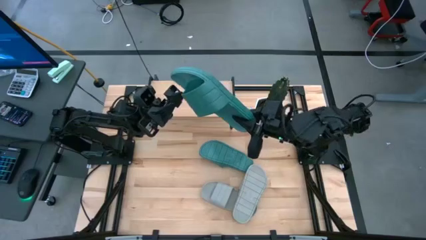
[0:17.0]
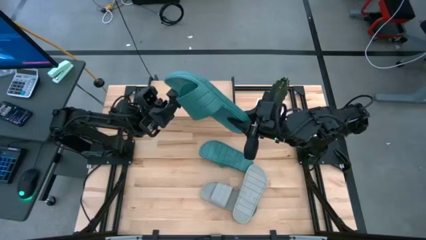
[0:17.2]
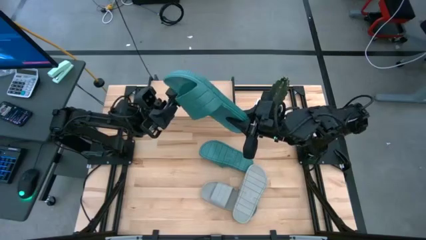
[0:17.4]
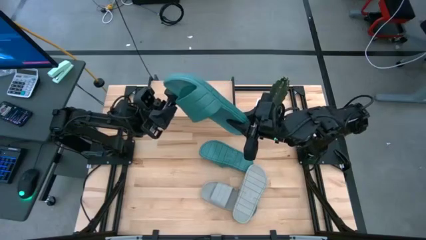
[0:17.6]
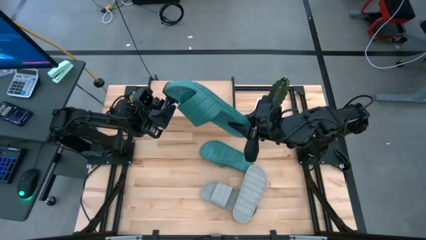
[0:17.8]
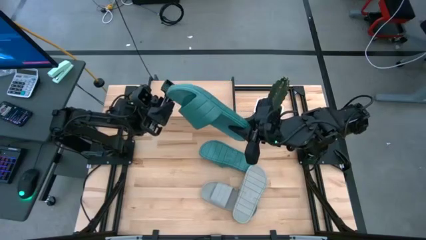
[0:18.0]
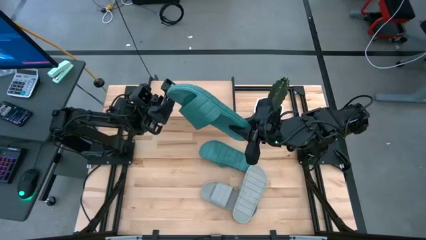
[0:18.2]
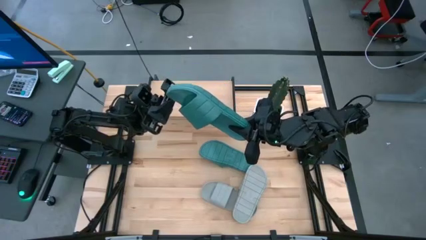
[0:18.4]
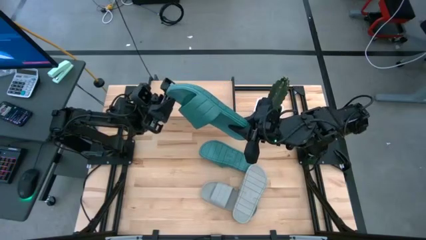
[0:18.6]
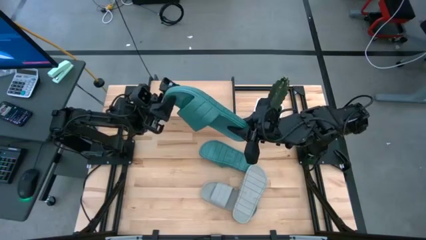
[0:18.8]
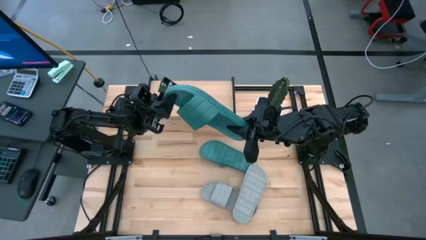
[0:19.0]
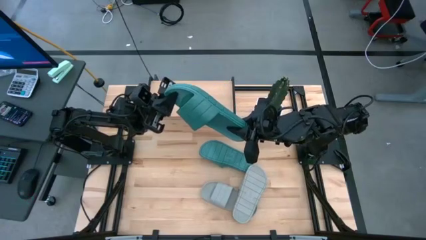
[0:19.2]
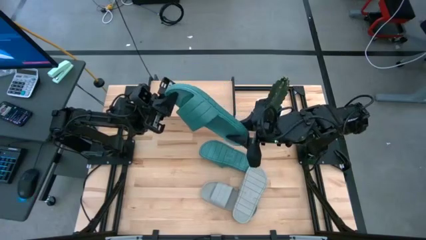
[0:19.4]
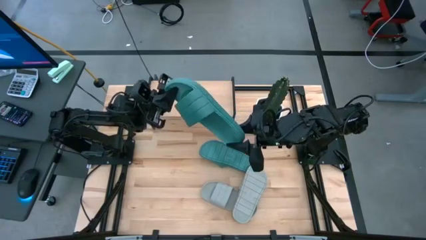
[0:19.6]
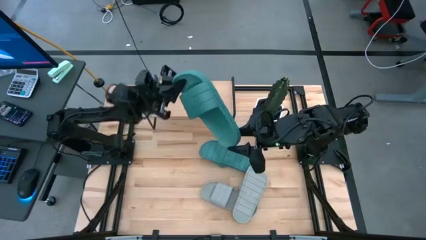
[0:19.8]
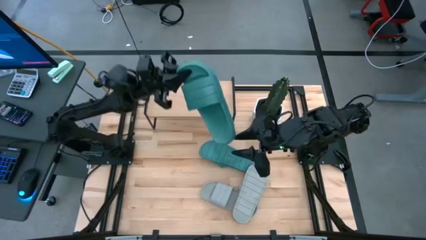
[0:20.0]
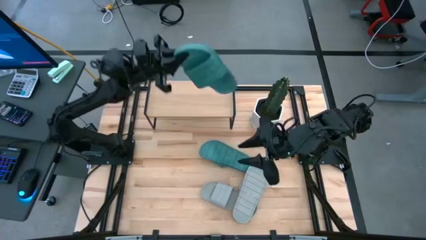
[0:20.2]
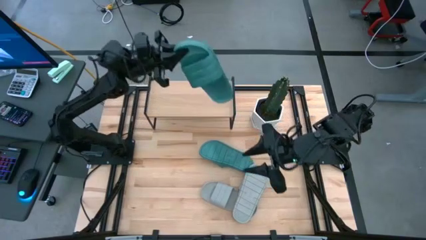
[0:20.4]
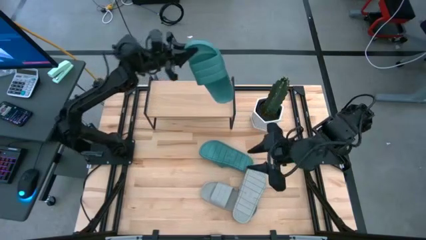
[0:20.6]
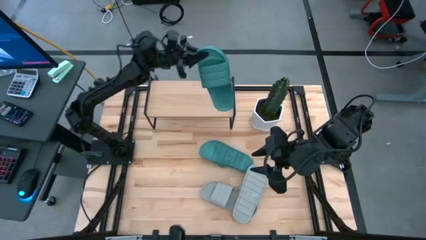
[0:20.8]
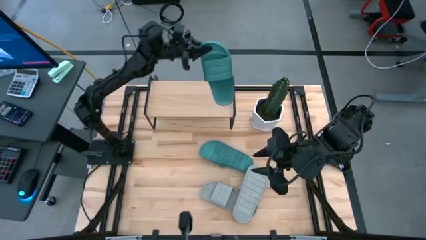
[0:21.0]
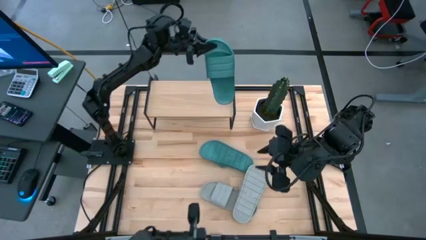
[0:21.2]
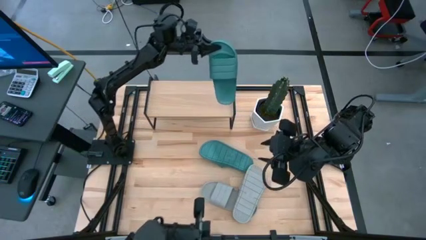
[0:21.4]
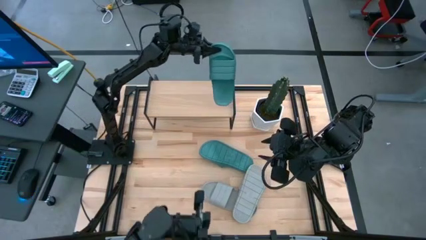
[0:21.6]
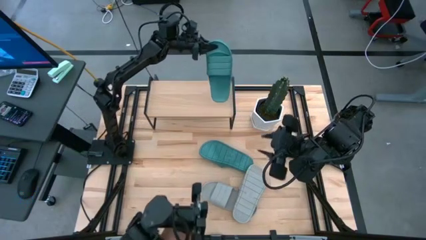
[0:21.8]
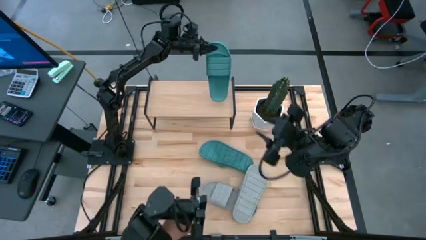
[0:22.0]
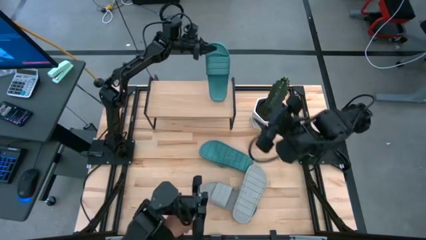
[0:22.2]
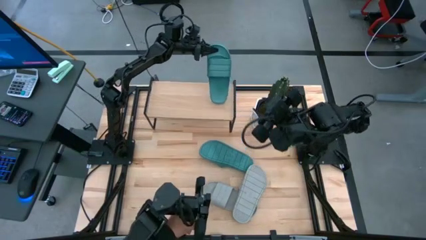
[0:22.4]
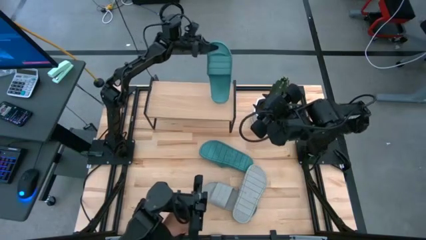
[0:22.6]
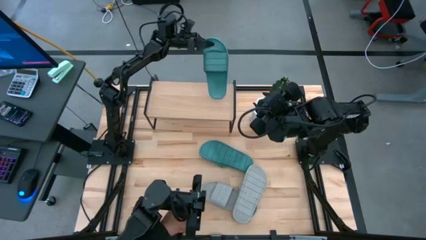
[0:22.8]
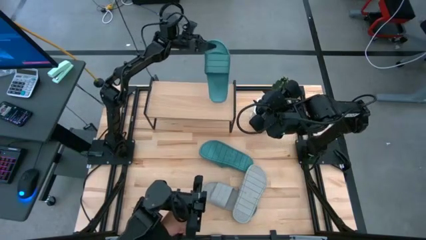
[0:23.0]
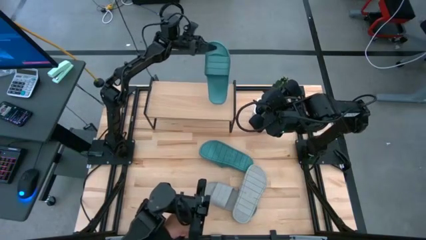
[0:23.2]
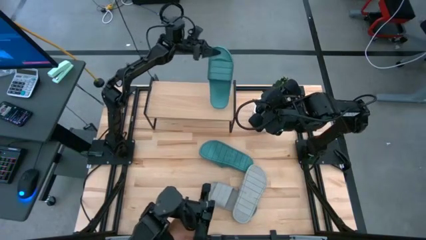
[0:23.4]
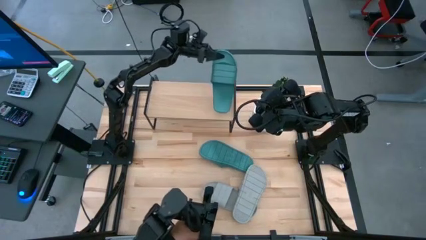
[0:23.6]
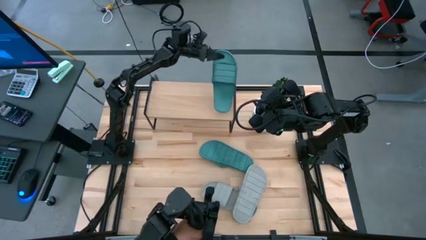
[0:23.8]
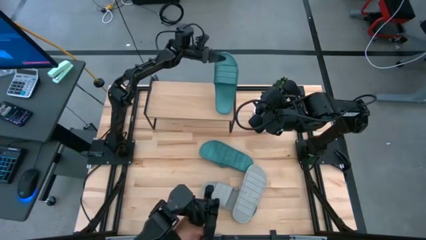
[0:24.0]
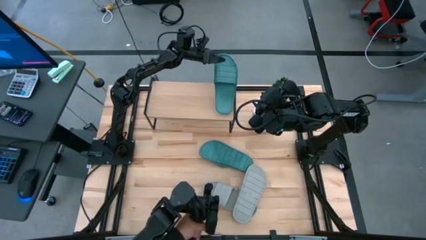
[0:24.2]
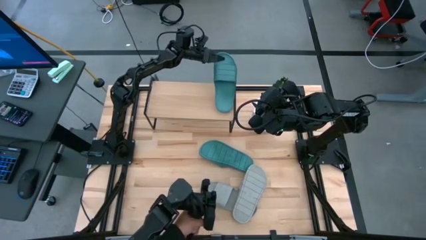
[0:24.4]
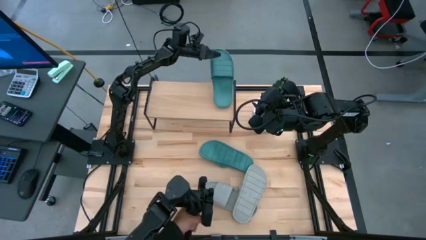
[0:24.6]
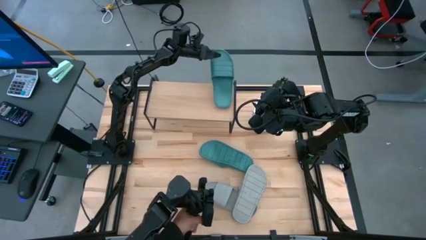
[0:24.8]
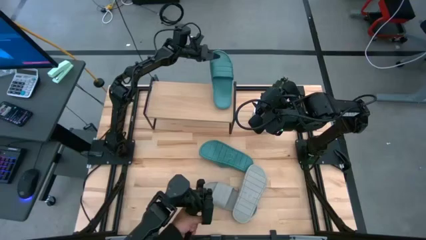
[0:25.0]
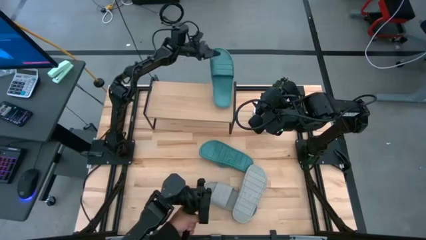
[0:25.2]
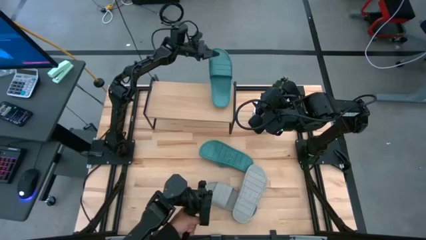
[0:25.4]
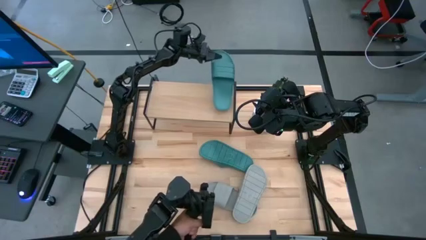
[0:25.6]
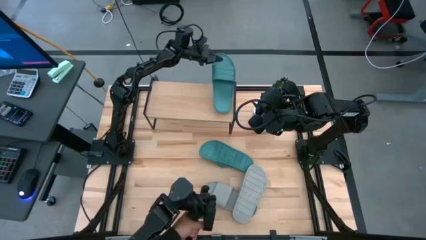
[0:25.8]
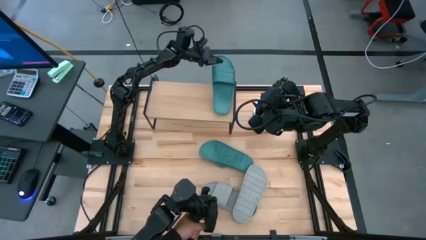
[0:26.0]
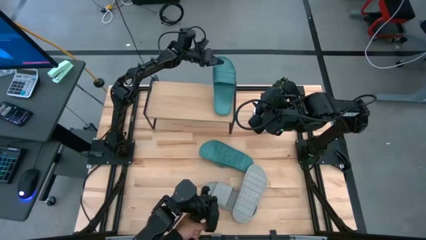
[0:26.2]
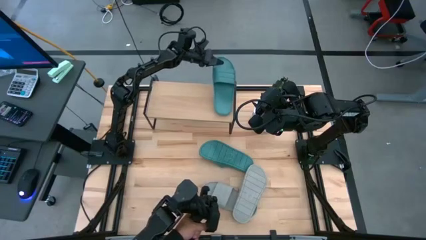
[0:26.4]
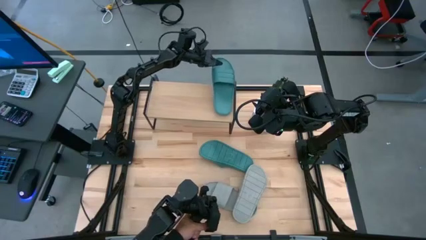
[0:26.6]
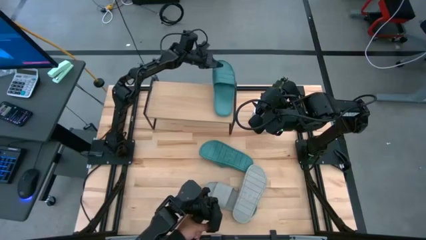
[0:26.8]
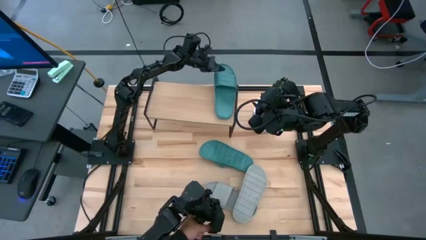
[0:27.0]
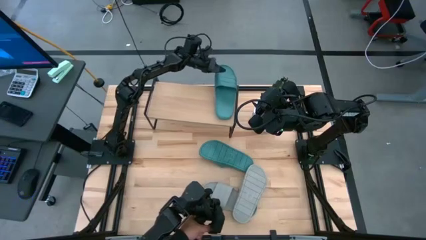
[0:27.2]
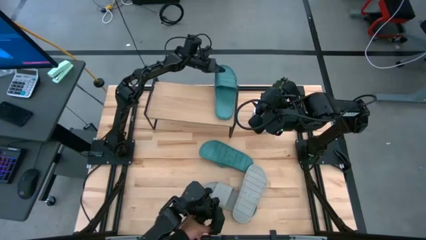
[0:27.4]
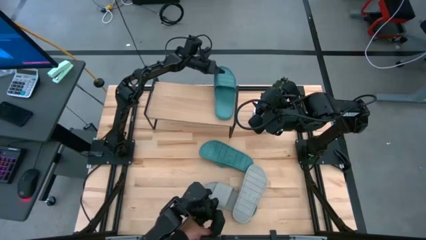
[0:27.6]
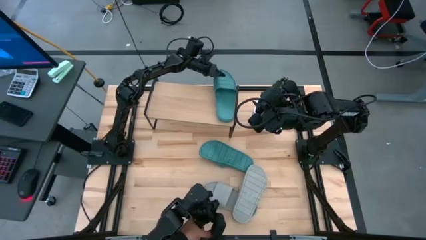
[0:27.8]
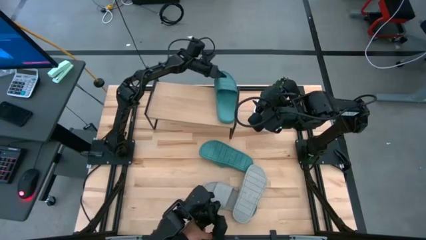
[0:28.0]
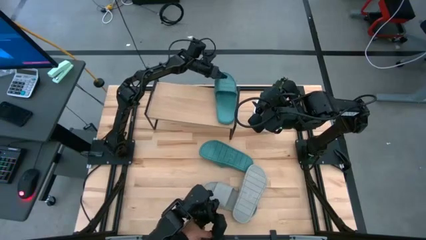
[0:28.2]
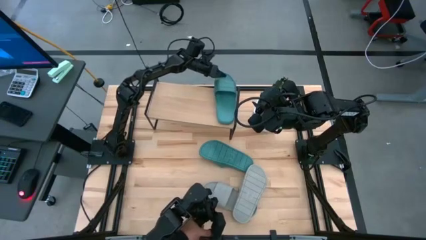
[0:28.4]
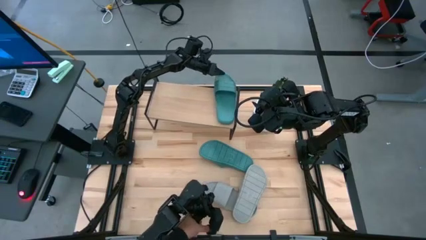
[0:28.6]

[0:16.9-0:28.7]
Task: Pick and place slides into the shelf
Put the left green slide on the shelf

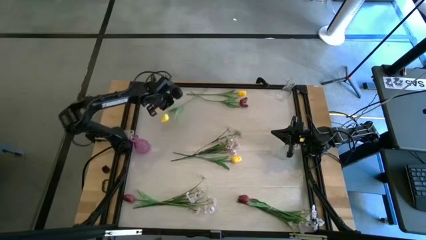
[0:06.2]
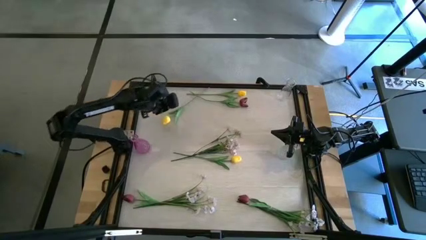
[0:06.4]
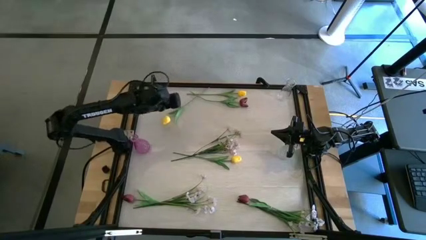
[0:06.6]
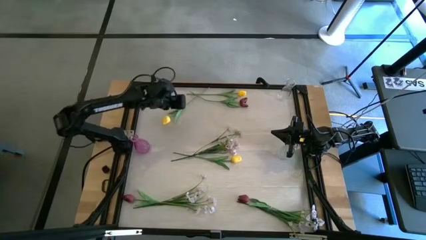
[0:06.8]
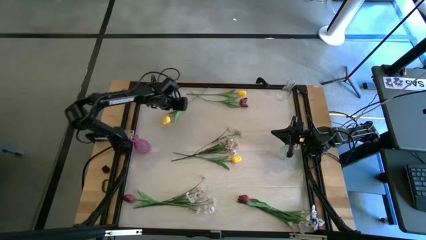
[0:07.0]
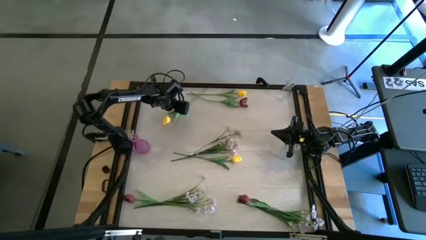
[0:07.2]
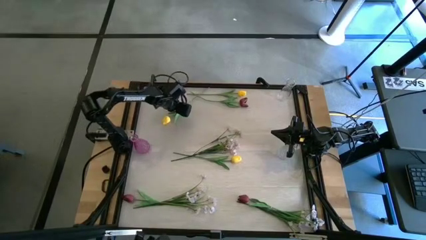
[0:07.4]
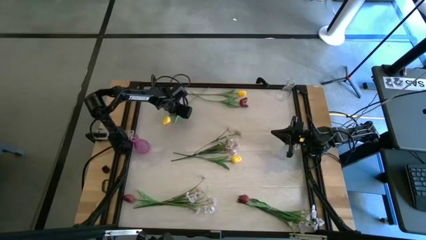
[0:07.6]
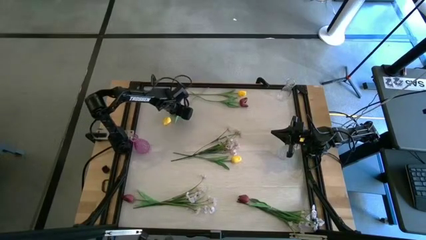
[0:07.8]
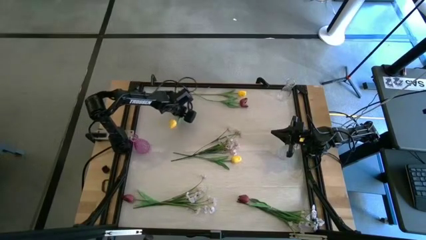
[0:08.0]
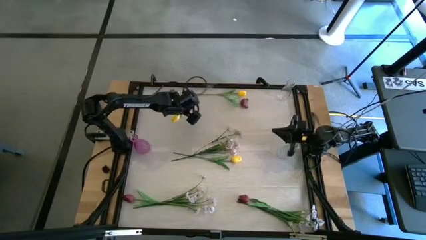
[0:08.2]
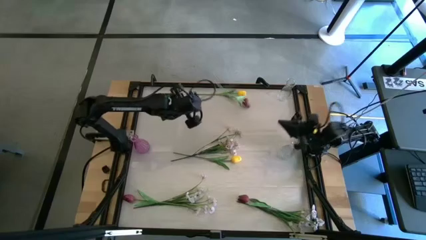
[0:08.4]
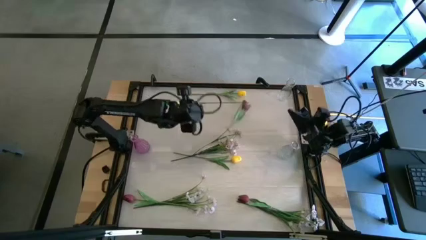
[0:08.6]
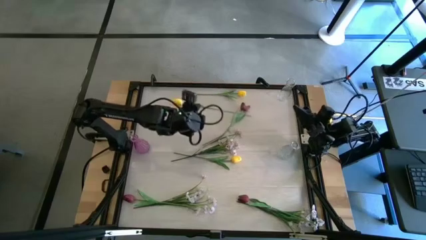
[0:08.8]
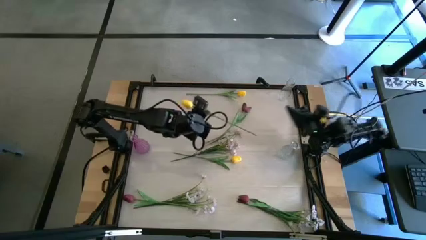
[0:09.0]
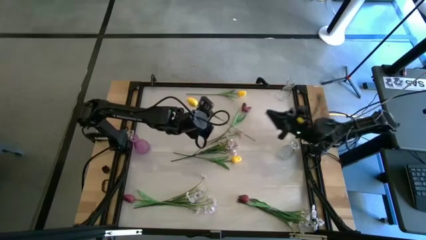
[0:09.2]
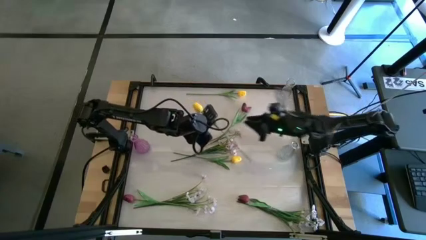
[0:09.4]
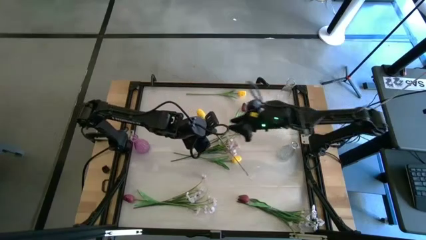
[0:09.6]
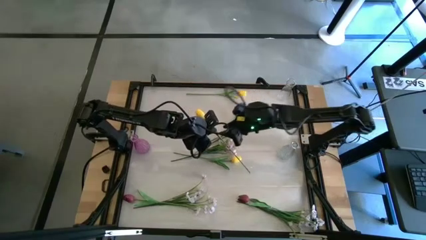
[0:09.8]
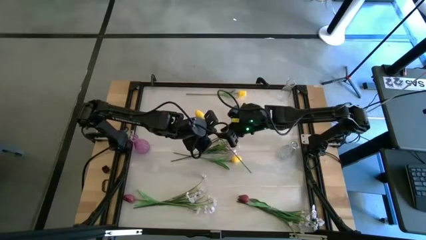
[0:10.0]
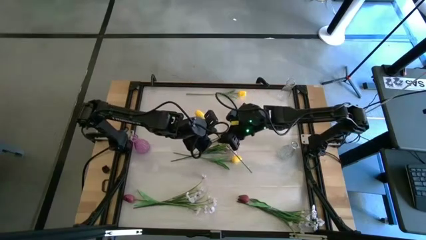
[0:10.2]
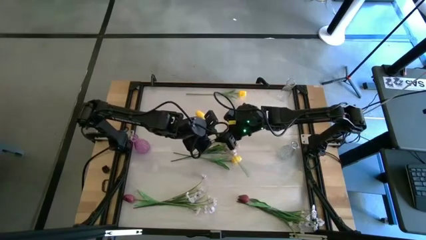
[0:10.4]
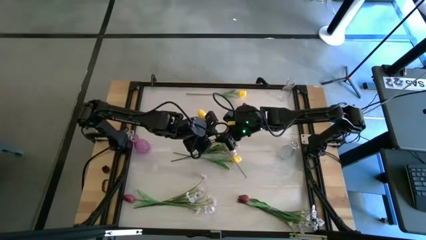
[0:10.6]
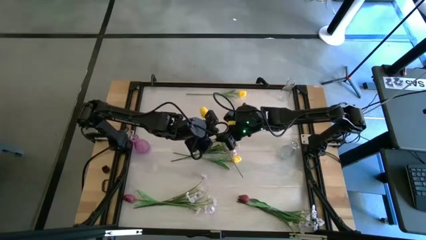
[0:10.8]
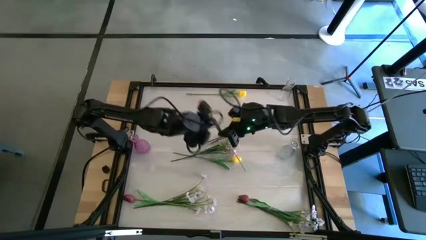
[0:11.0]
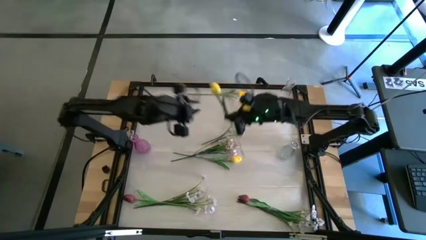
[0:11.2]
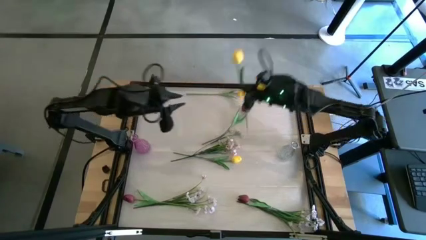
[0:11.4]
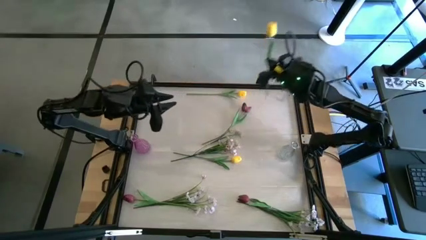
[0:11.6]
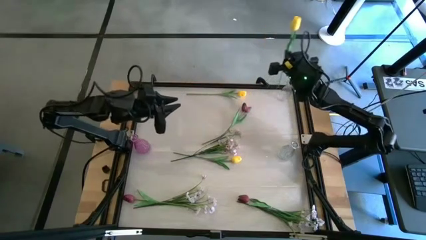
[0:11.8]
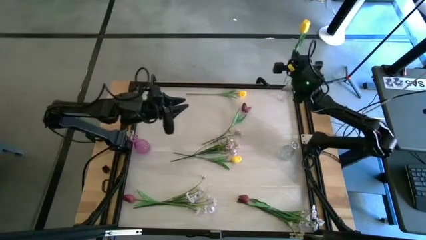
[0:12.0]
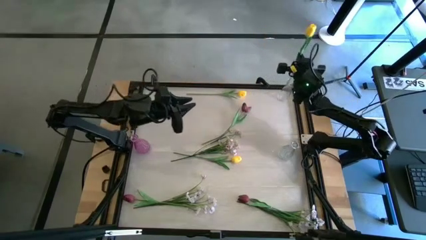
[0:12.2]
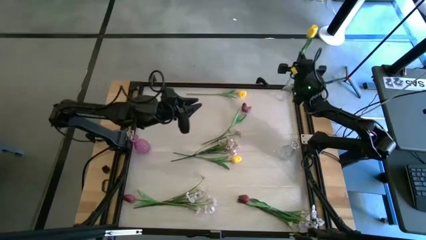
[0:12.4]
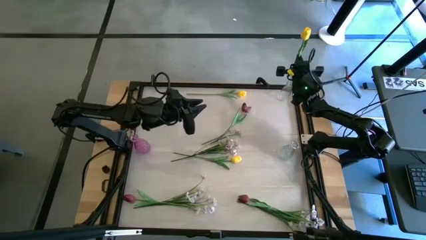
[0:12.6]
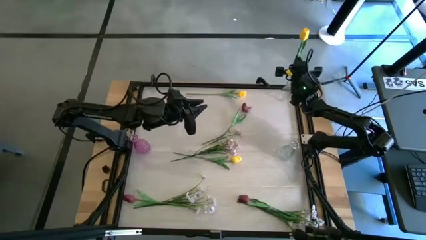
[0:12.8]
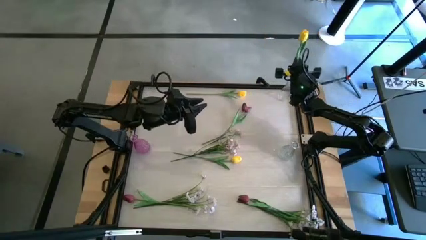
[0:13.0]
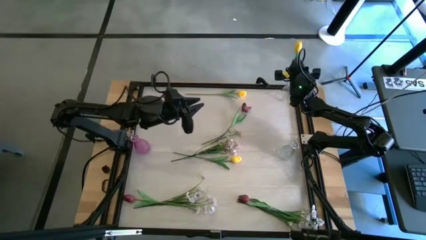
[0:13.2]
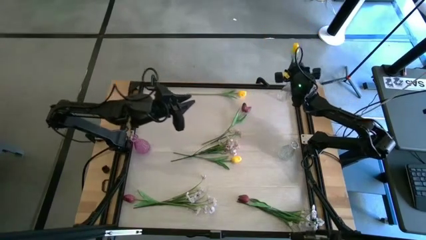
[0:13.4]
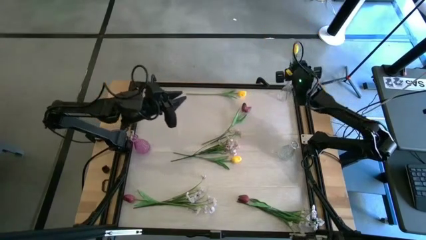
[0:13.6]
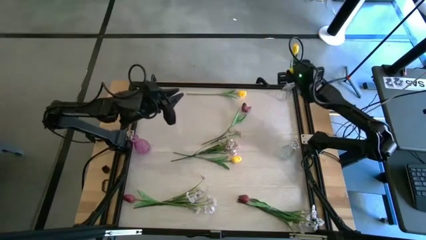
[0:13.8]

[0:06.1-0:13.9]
Task: Sort flowers into vase by color
Put the top left yellow flower into the top transparent vase
